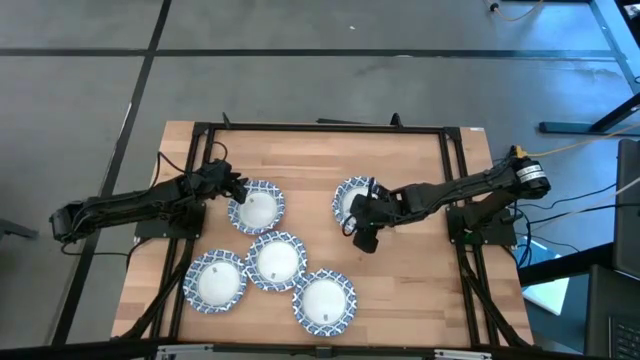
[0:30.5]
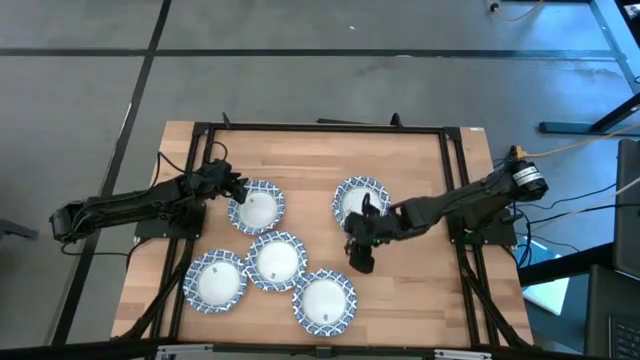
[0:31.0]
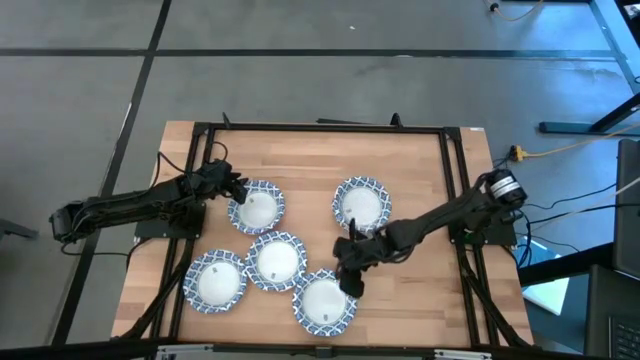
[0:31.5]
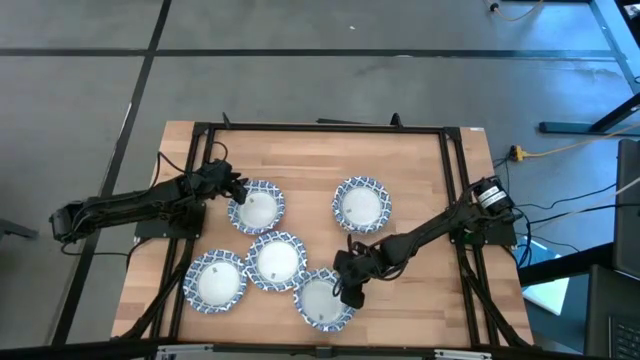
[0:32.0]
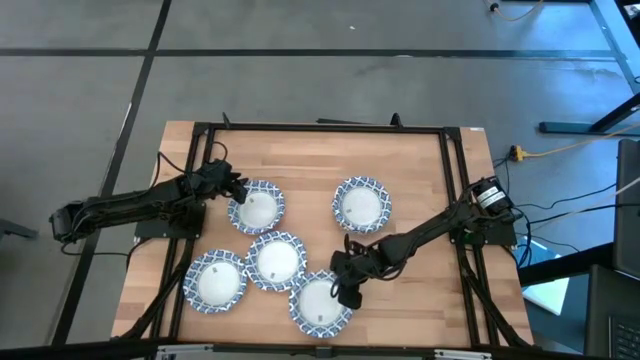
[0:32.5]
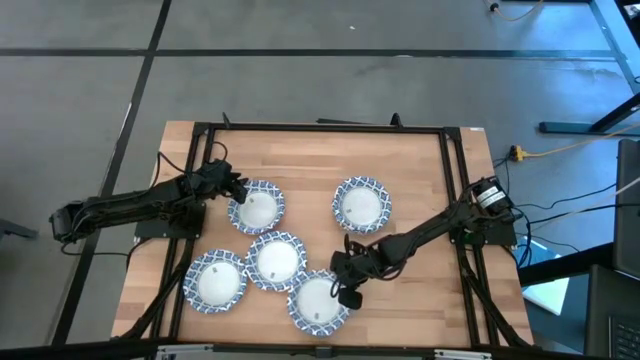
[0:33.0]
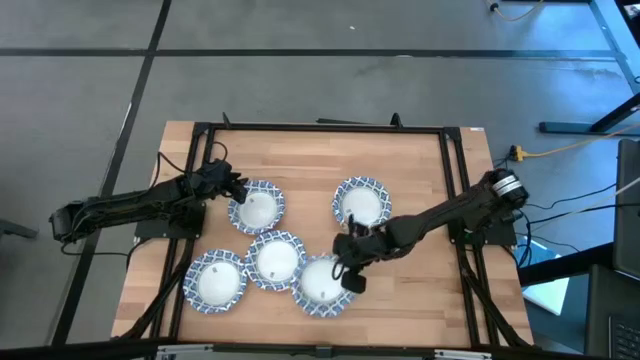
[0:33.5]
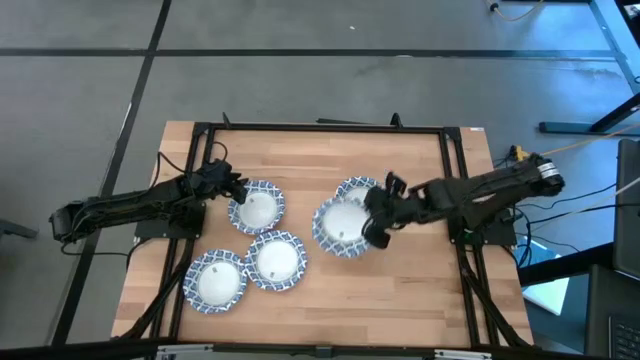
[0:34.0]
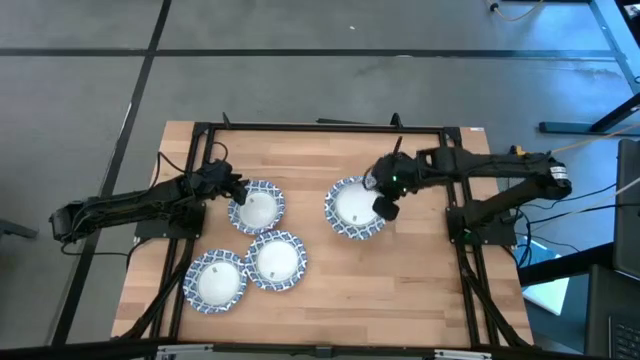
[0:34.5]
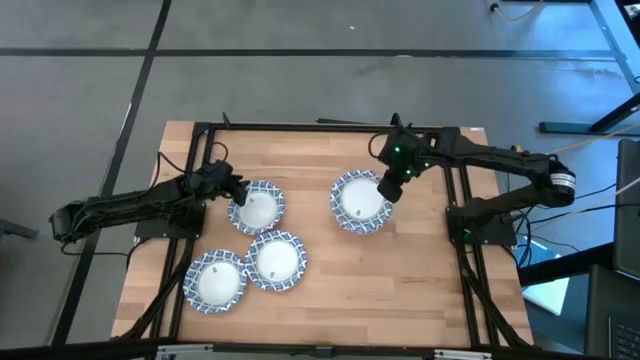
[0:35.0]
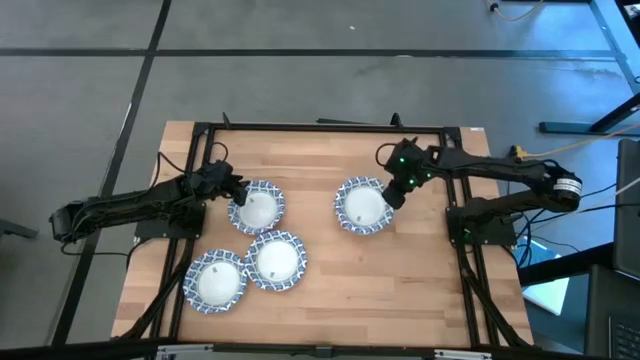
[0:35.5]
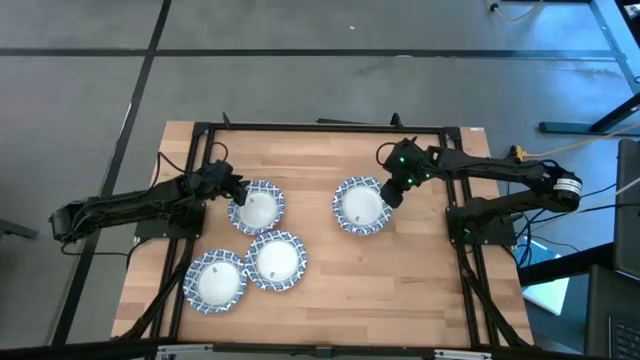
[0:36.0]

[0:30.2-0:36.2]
Task: Nest bowls inside each other
Stack the white patterned bowl on the white patterned bowl

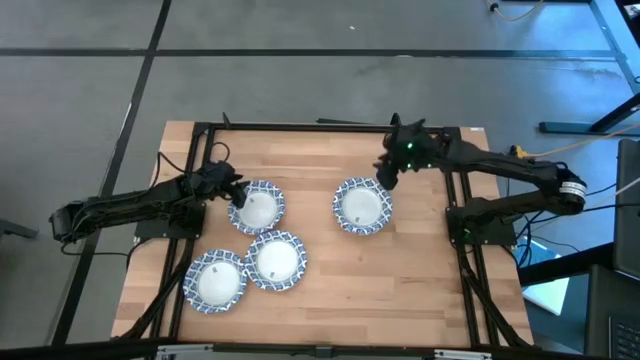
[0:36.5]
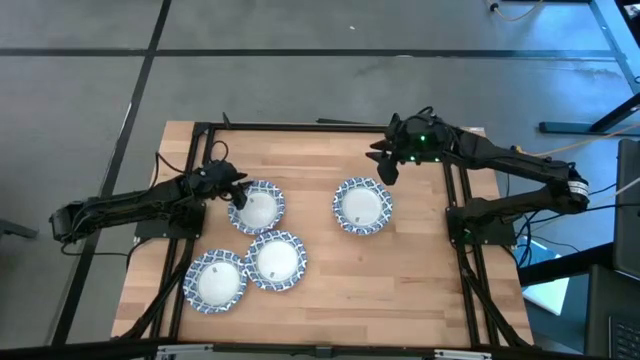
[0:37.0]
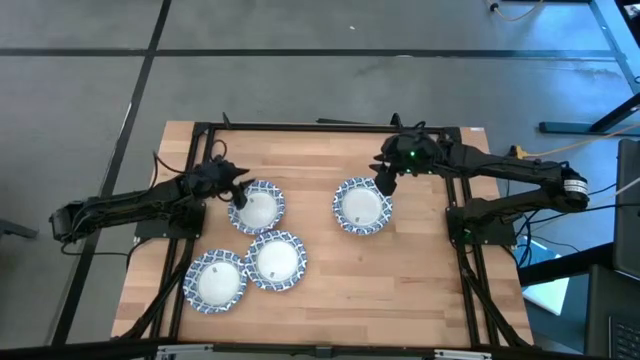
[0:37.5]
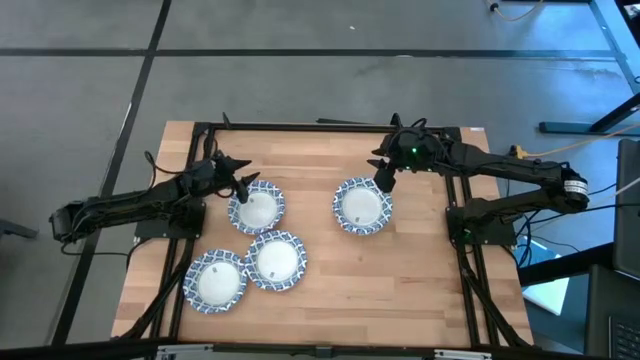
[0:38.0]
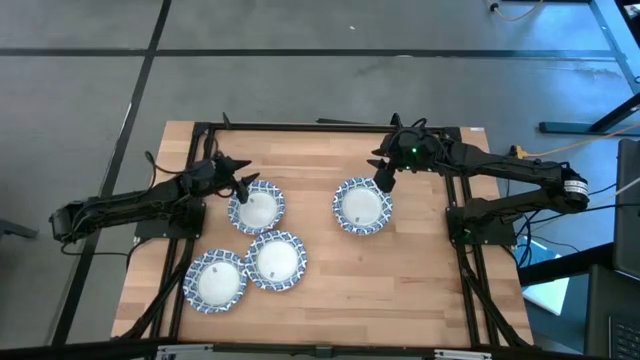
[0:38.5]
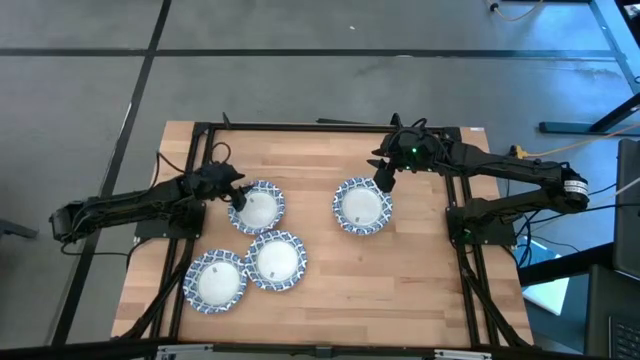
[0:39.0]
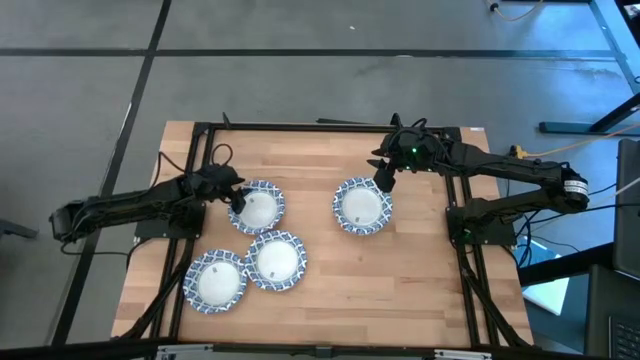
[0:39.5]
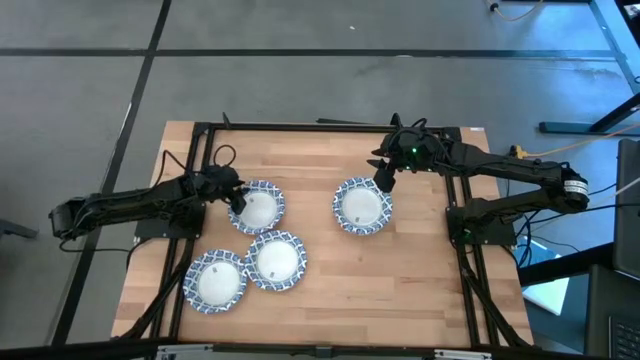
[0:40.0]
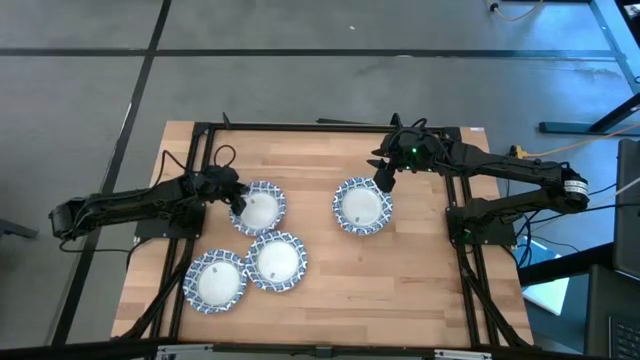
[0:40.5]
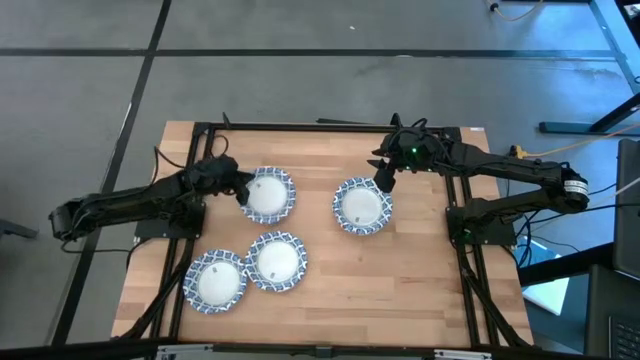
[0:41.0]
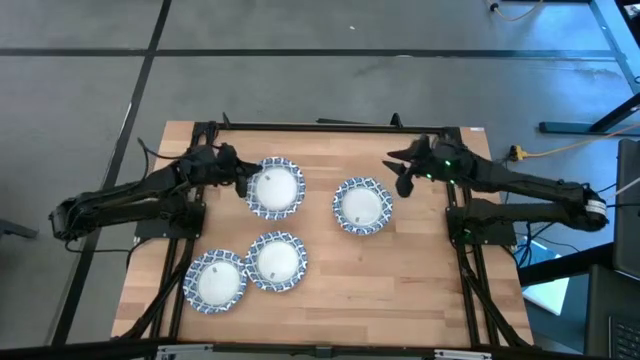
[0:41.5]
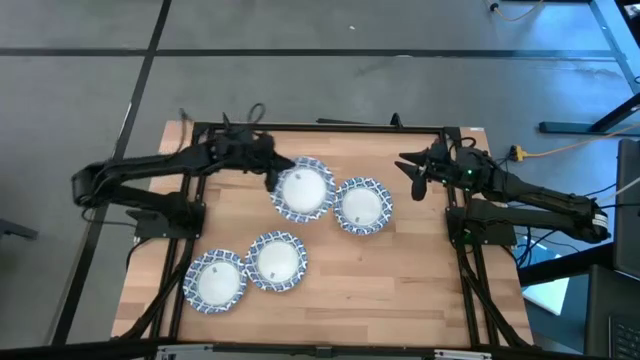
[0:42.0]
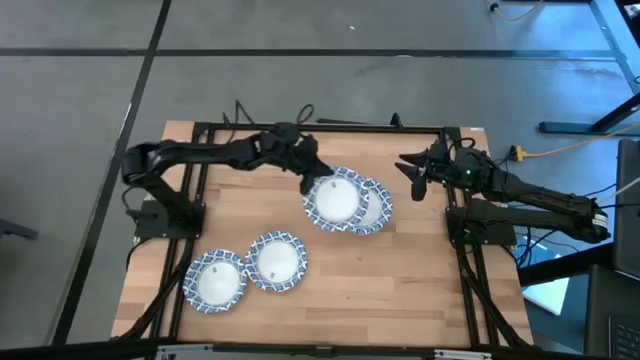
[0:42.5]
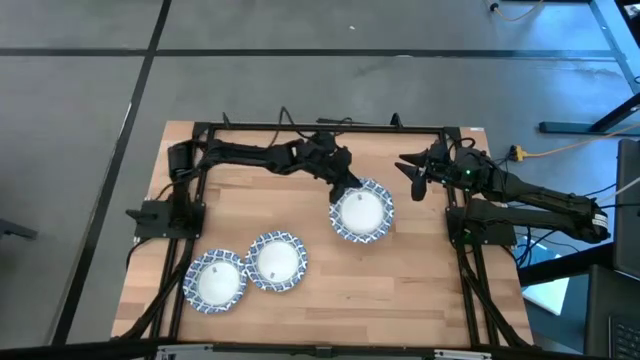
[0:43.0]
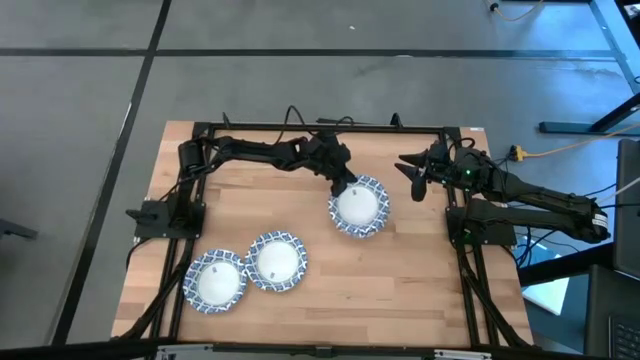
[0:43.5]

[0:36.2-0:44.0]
Stack the white patterned bowl on the white patterned bowl

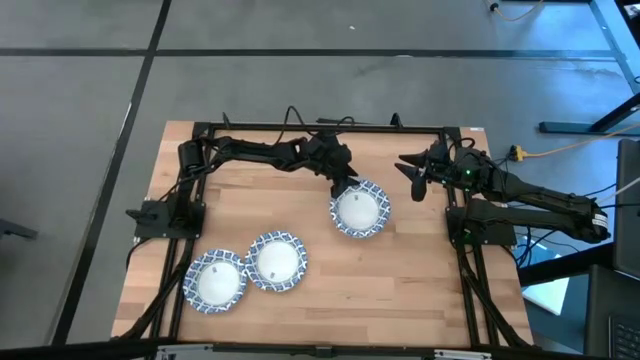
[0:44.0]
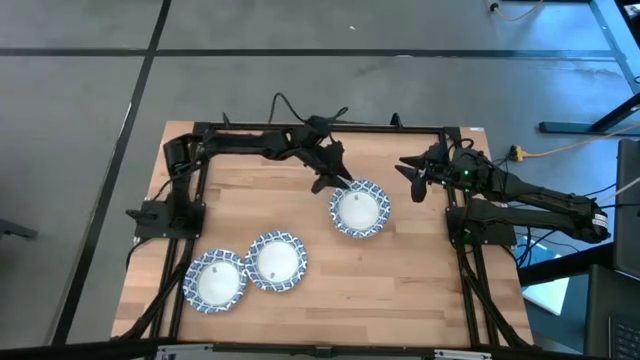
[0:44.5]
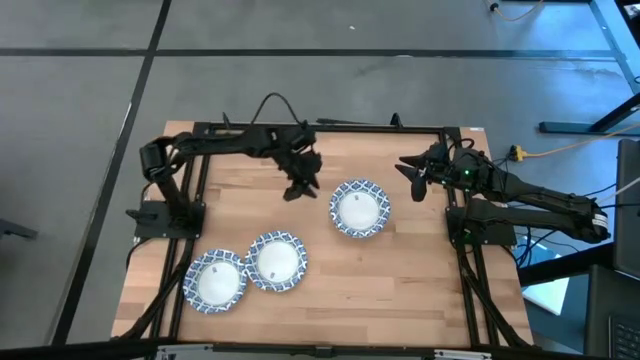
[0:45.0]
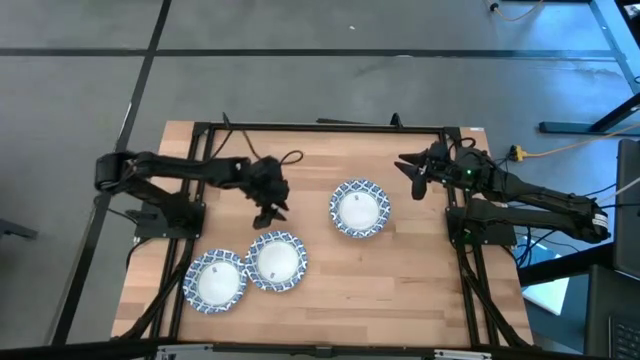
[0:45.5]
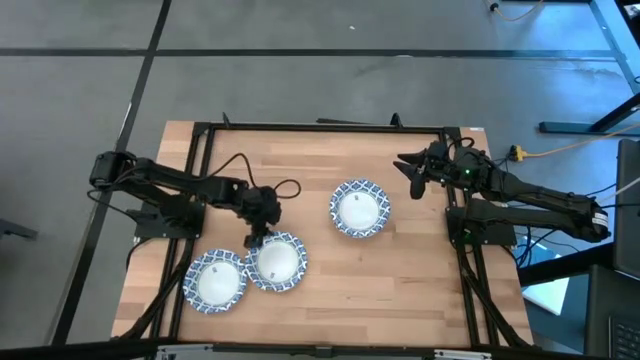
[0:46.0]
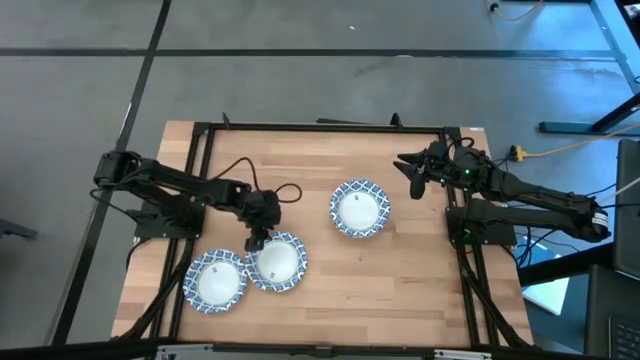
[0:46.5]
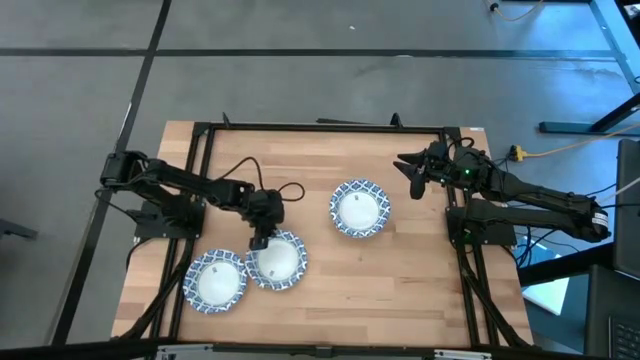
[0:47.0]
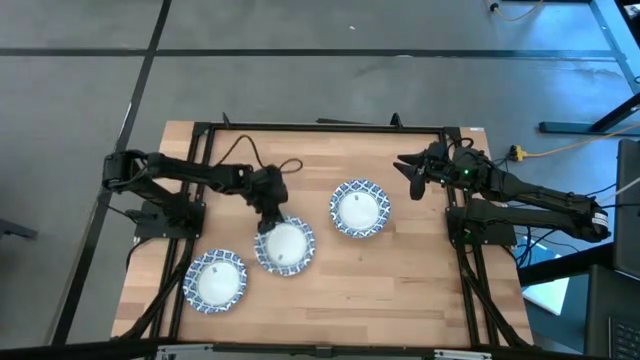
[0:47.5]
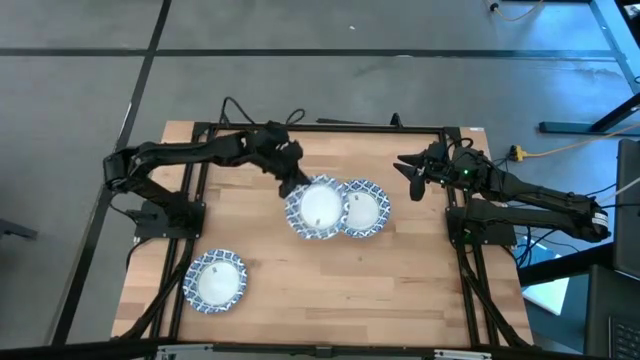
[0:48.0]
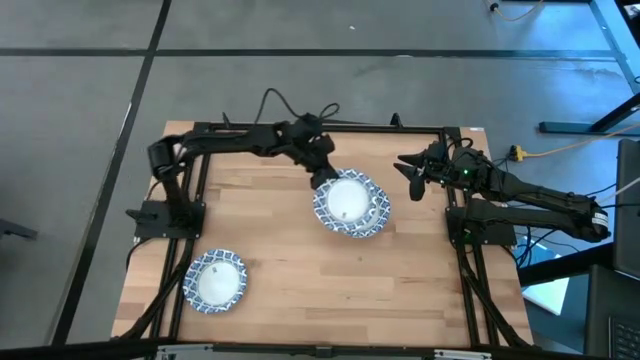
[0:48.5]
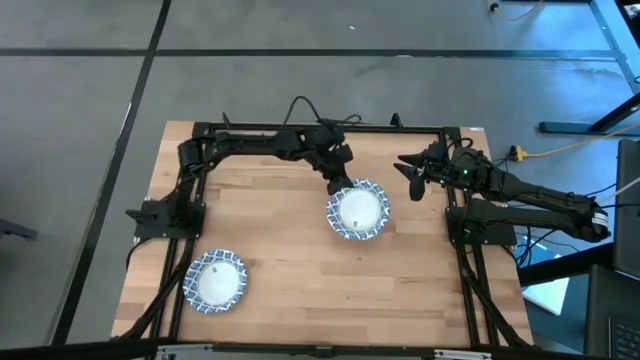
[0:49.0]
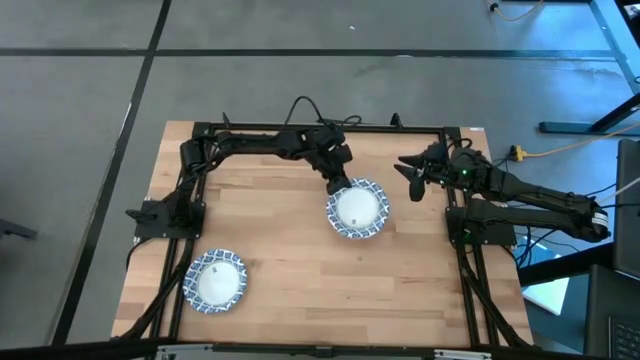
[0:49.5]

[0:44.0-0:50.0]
Stack the white patterned bowl on the white patterned bowl
